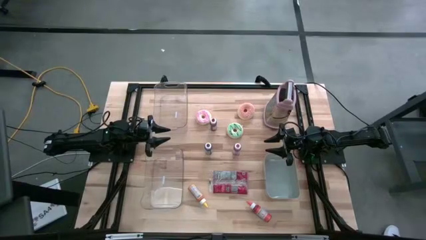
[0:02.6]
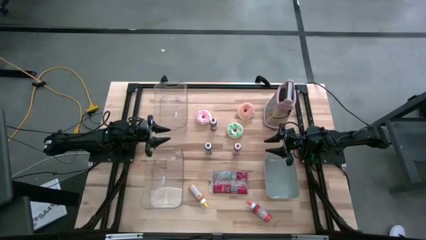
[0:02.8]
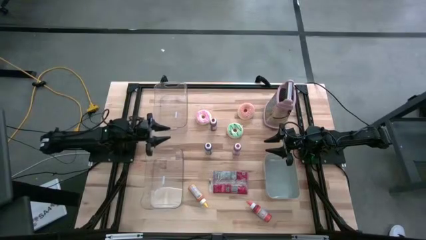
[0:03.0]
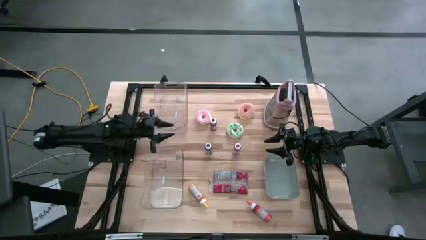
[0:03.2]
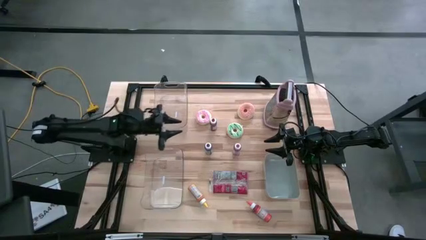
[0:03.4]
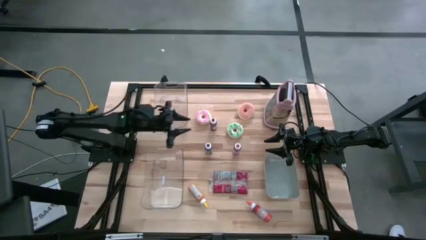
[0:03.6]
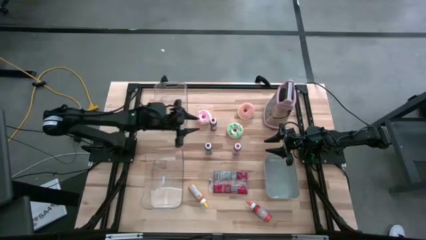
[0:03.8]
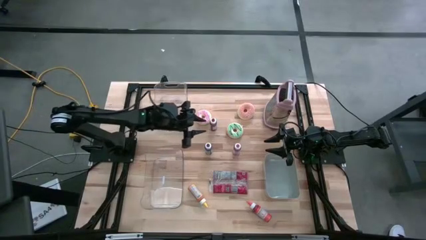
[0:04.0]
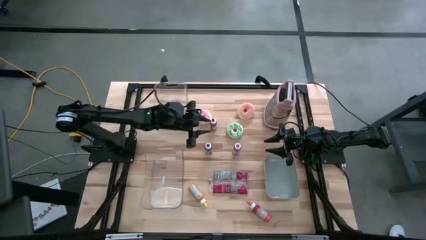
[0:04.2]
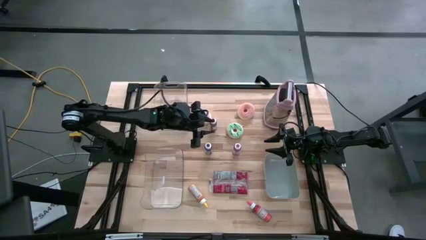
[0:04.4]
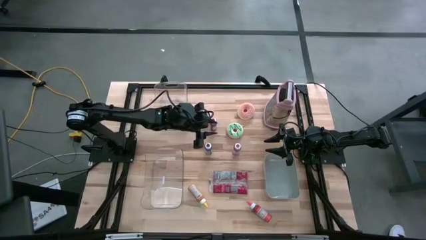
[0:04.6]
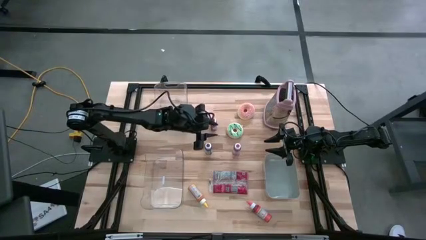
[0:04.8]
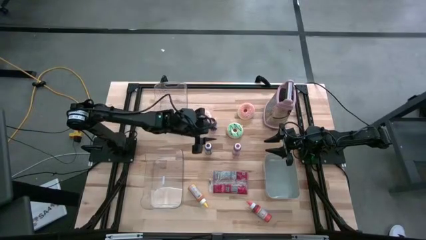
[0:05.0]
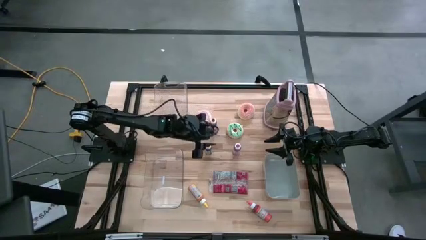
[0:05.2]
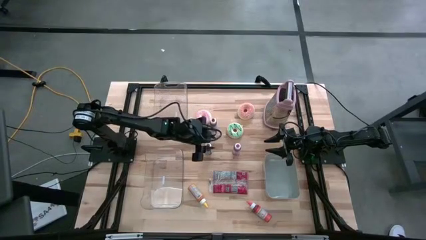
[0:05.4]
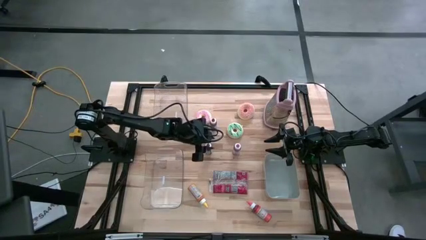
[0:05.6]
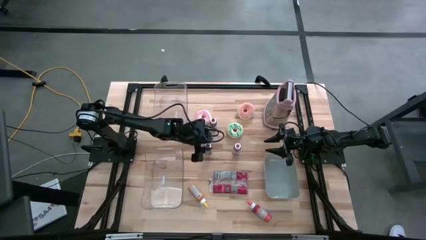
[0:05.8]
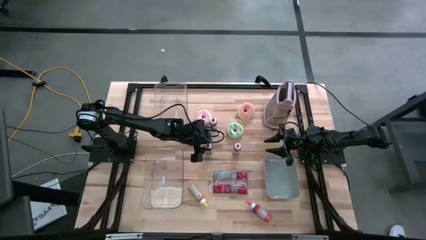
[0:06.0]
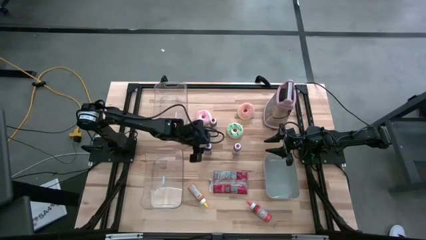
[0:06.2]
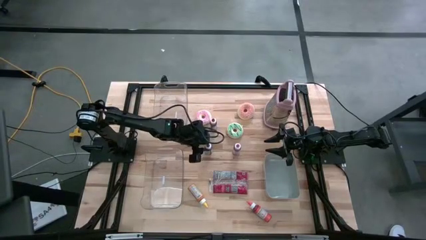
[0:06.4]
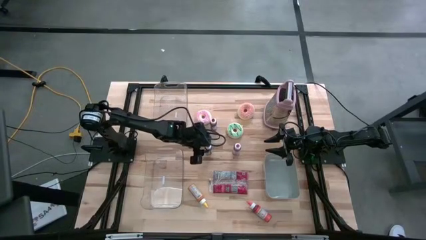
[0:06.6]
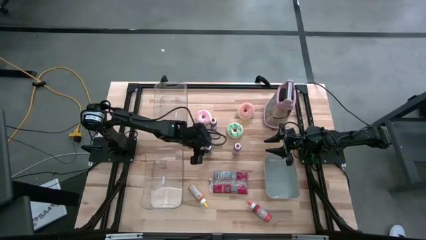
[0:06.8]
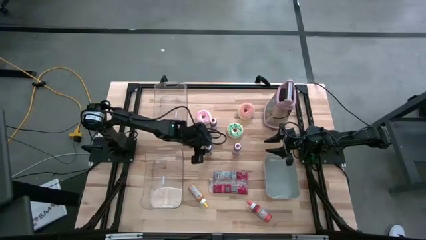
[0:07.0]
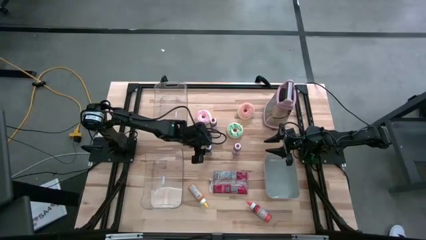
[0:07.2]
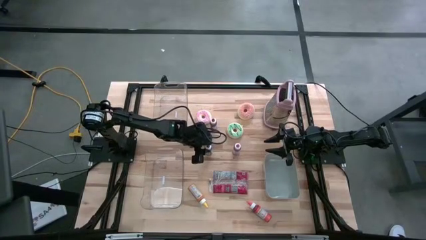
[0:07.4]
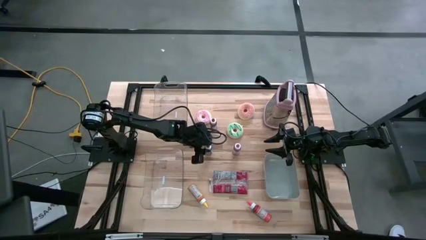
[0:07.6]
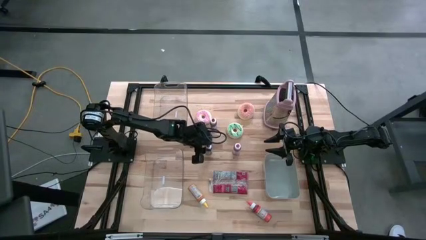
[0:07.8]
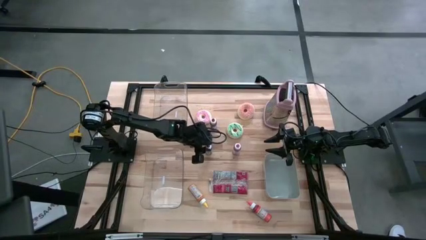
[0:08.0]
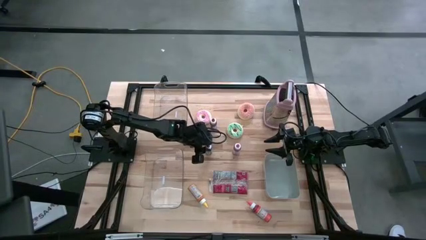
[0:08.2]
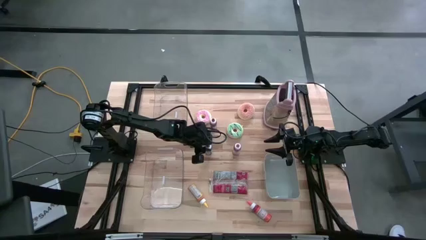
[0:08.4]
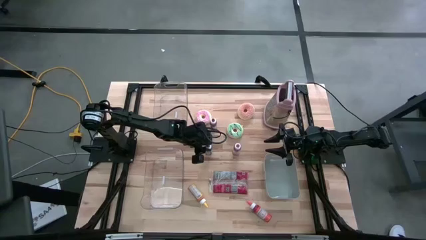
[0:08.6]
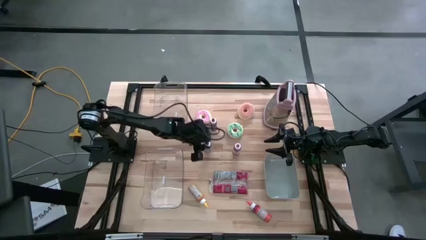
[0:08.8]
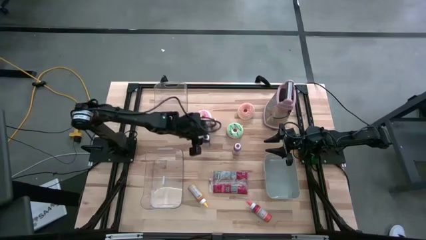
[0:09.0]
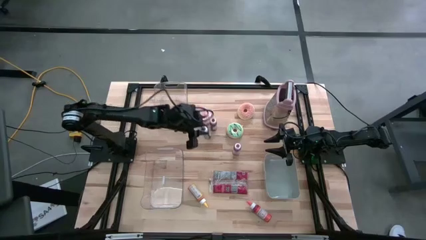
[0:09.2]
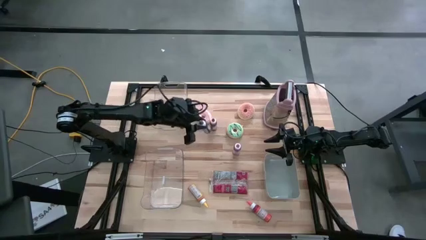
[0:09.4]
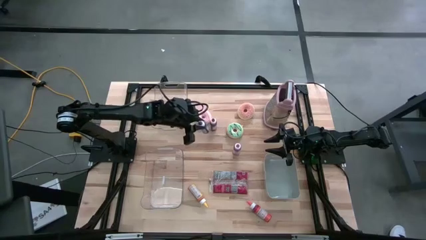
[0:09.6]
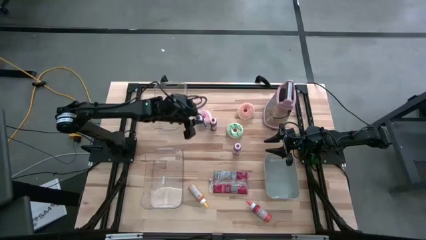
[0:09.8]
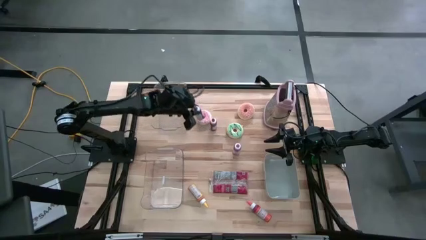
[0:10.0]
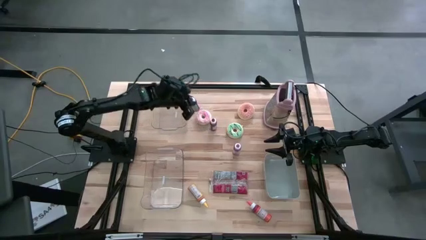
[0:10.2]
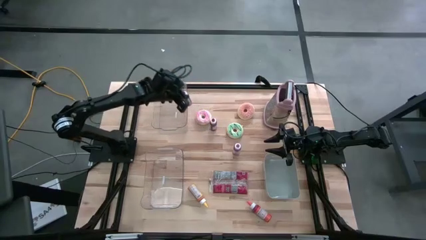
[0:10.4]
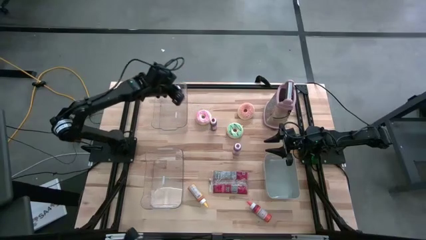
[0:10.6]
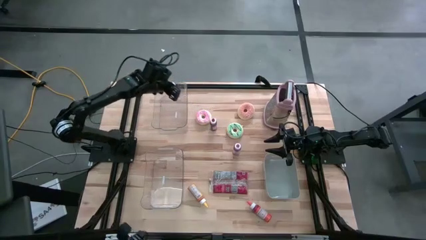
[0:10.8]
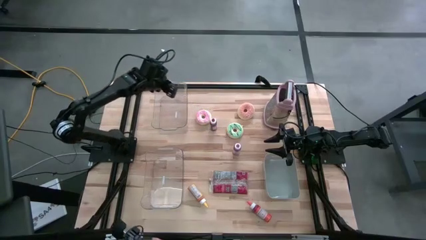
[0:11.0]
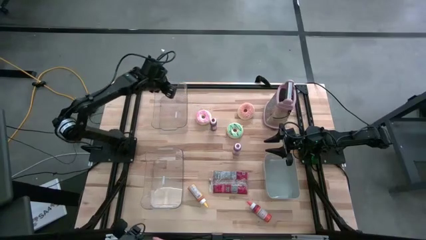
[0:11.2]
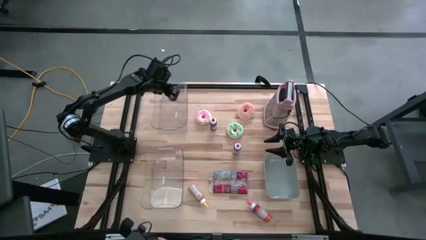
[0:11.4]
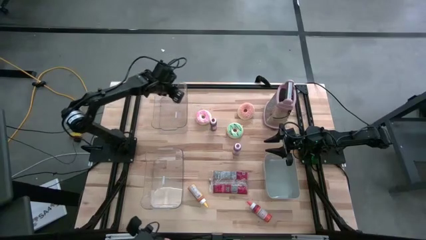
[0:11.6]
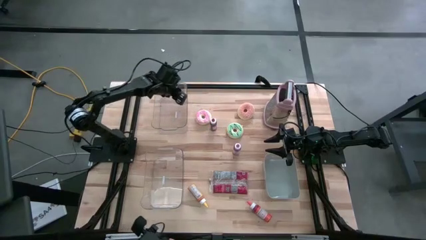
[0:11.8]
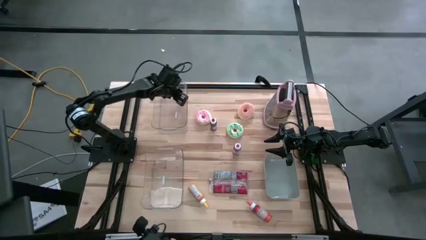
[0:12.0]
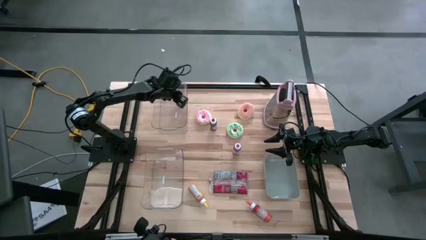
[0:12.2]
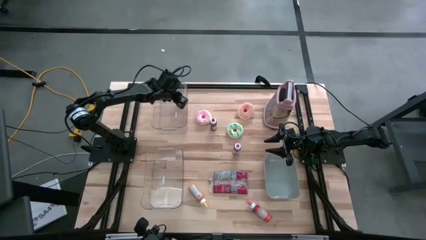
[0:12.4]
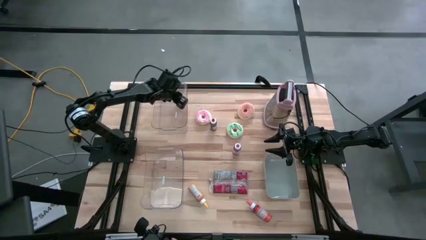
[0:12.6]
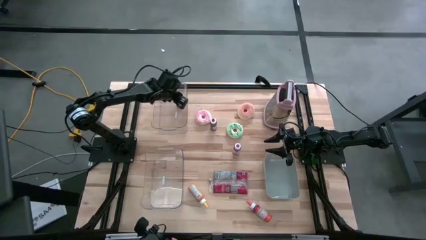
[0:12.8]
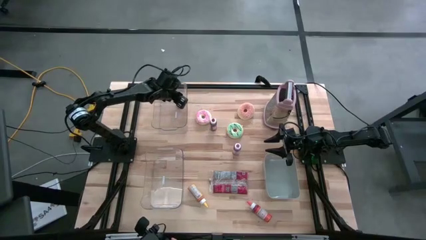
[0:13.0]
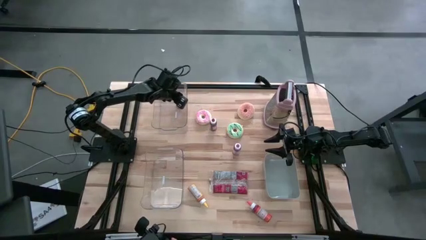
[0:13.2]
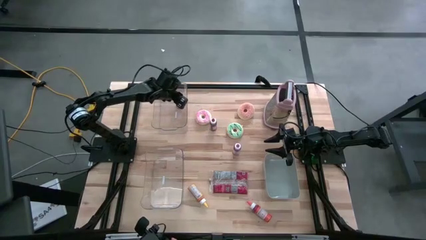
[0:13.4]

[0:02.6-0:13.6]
Put the purple food coloring bottle into the top transparent bin
